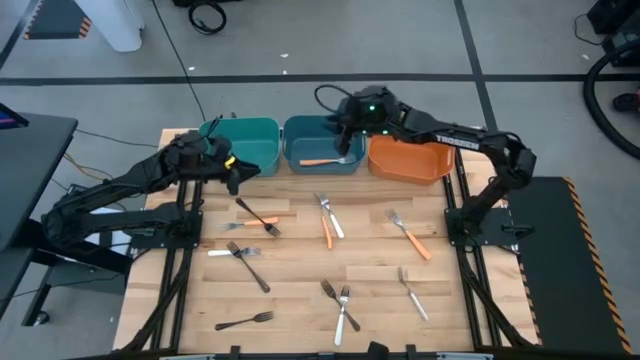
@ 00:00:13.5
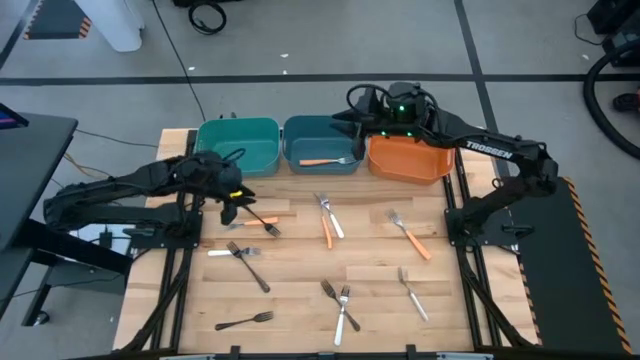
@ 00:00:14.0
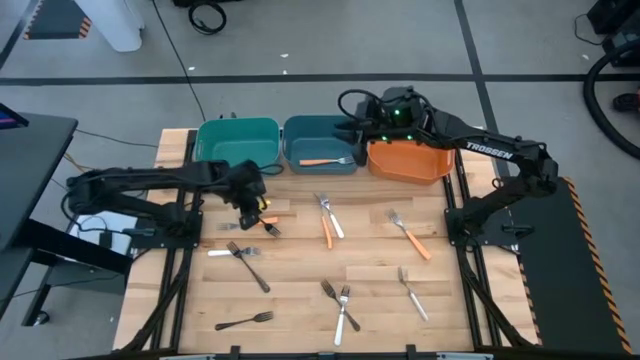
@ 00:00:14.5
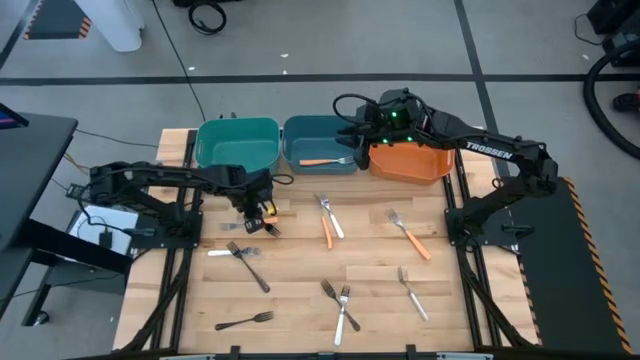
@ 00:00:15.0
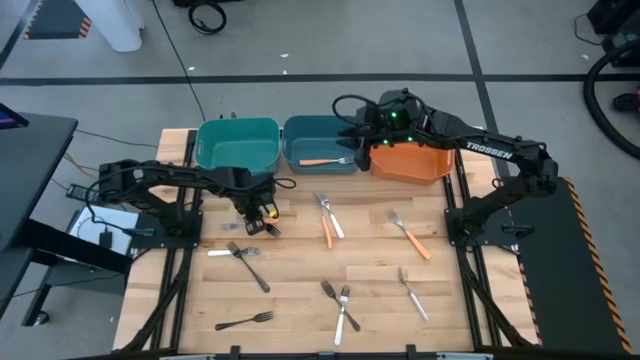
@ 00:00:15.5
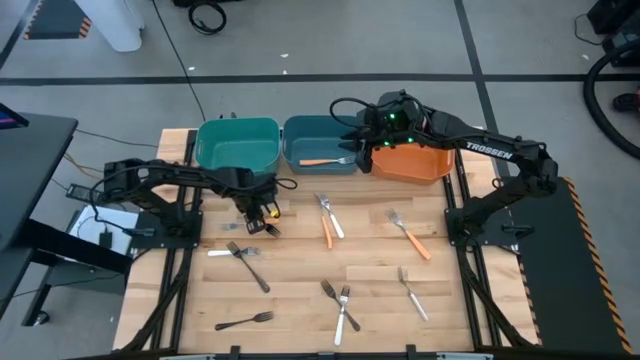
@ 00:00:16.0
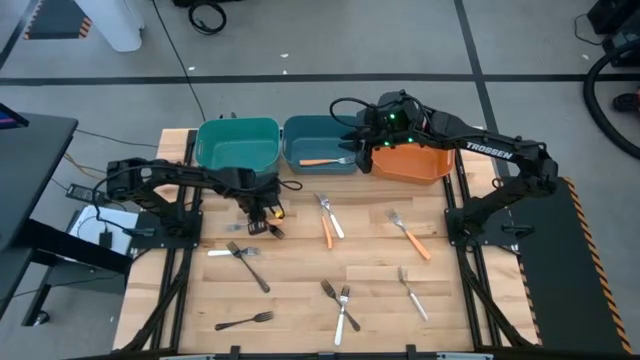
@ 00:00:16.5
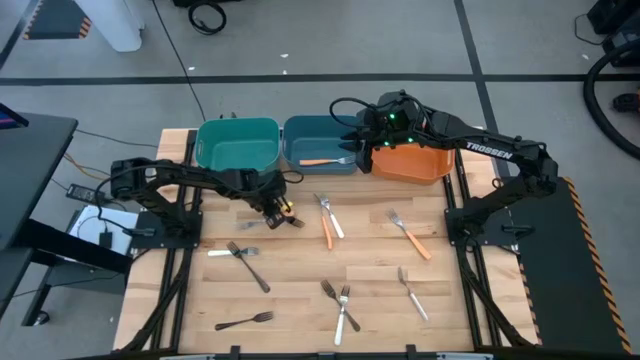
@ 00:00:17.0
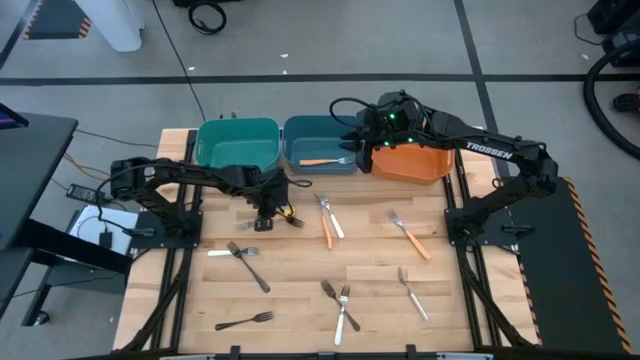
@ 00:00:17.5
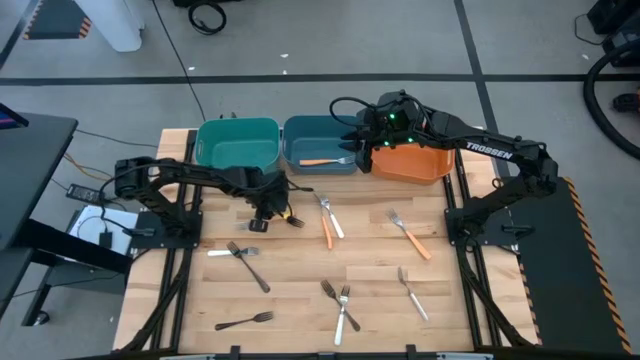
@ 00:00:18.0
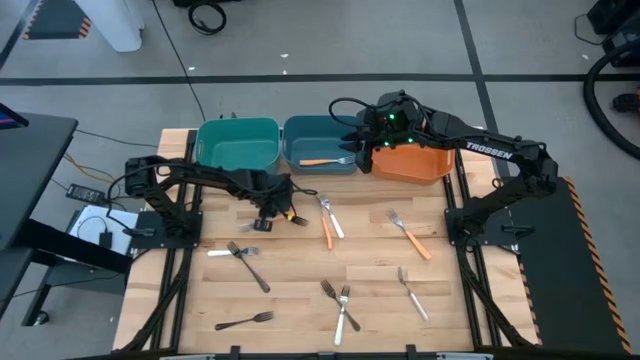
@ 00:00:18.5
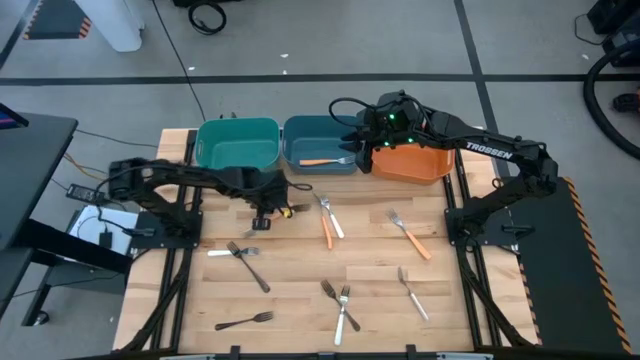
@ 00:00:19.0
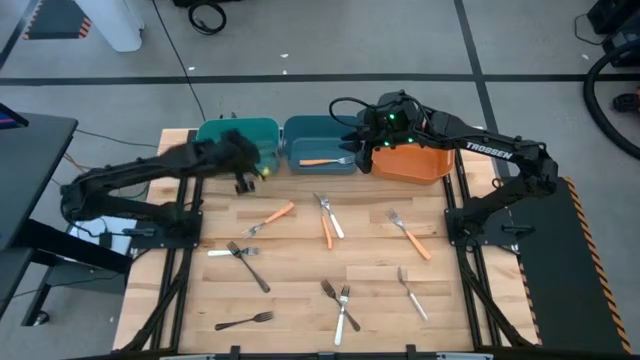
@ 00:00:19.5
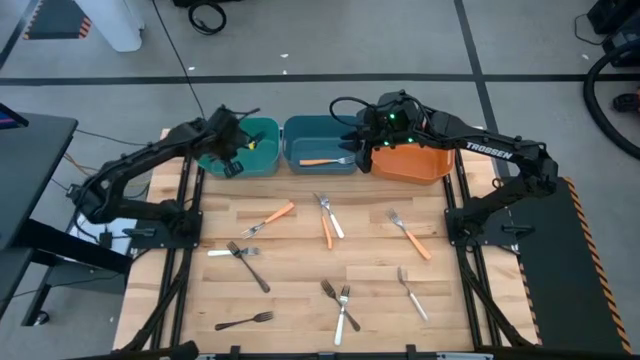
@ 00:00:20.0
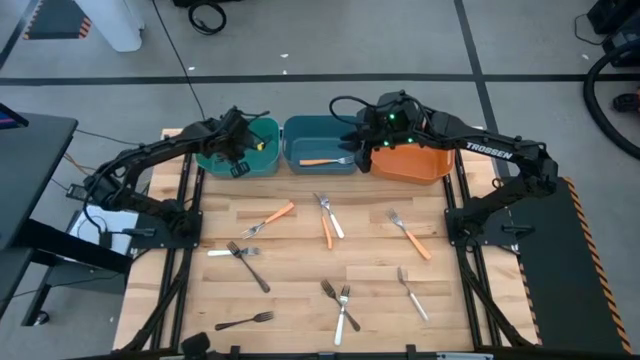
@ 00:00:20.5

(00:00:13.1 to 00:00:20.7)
Task: Sort silverware by color (type)
Put the top black fork in the green bin

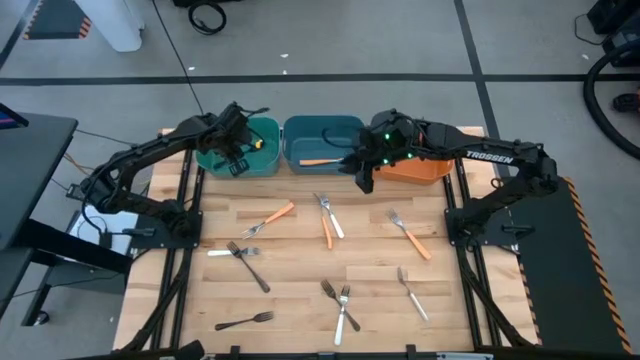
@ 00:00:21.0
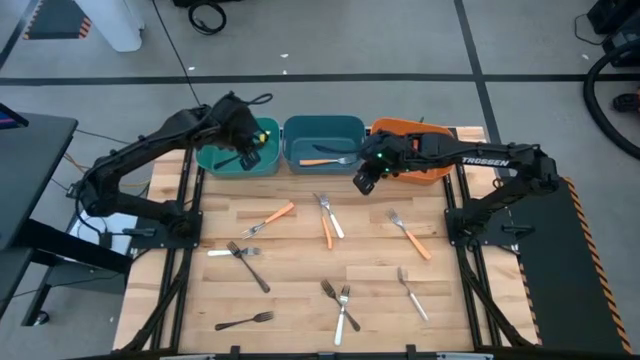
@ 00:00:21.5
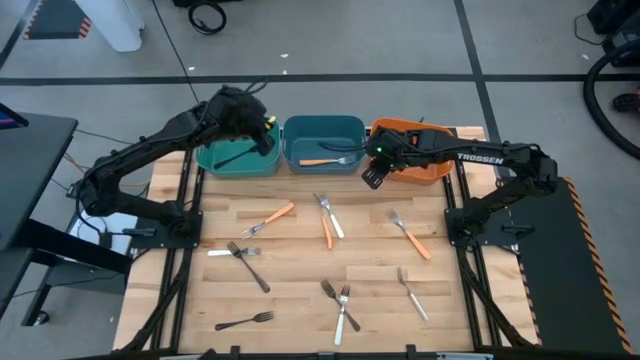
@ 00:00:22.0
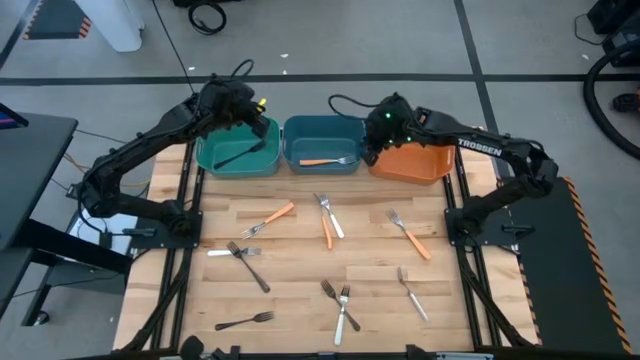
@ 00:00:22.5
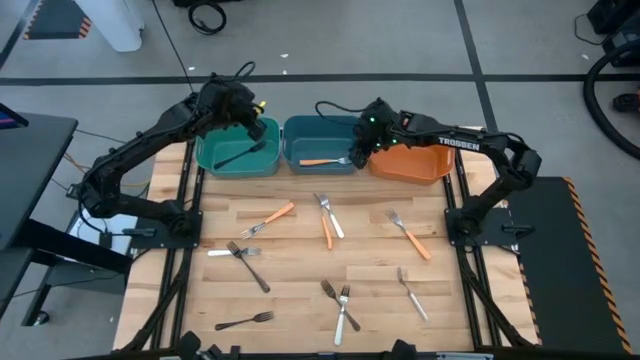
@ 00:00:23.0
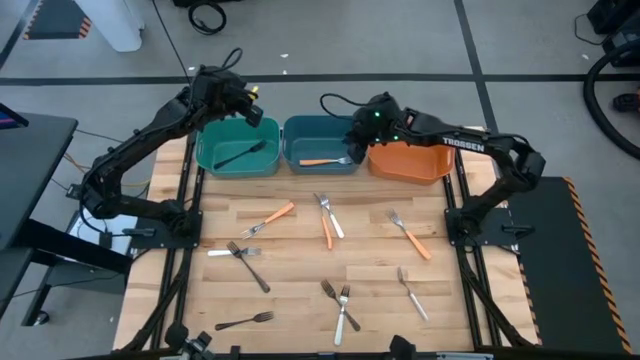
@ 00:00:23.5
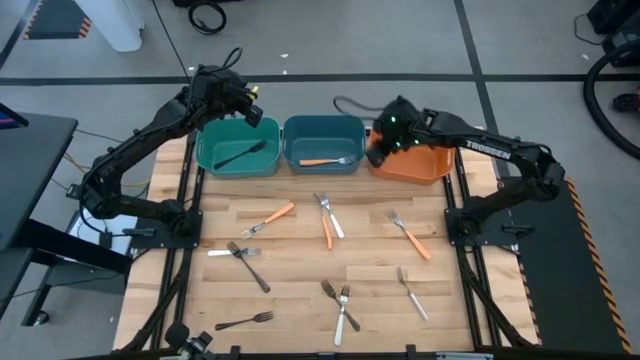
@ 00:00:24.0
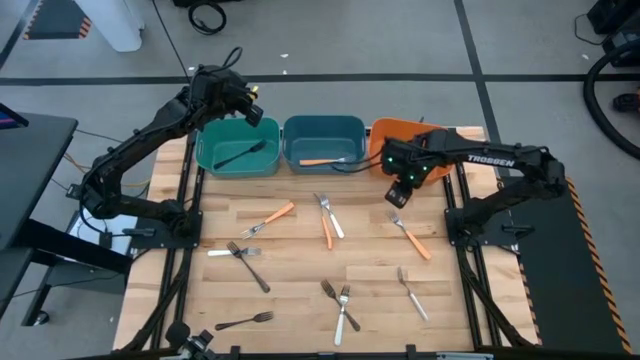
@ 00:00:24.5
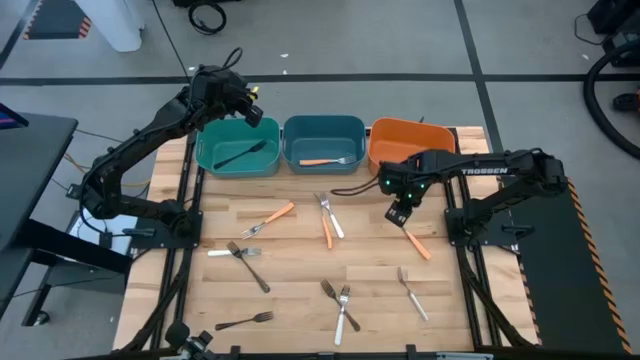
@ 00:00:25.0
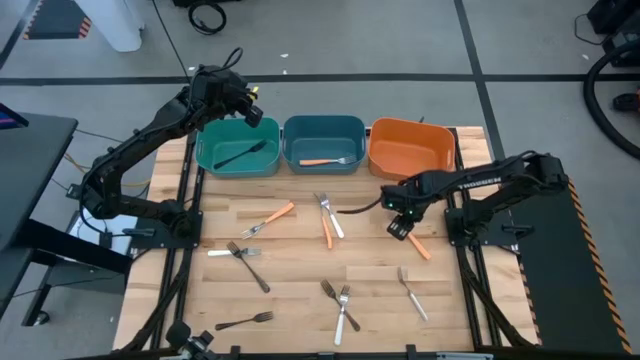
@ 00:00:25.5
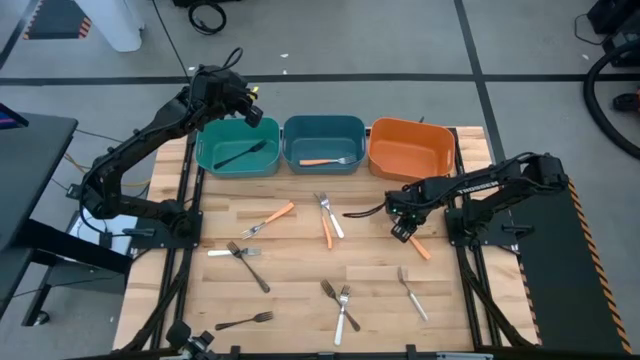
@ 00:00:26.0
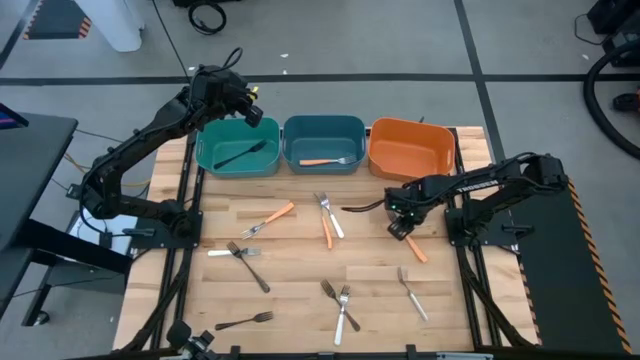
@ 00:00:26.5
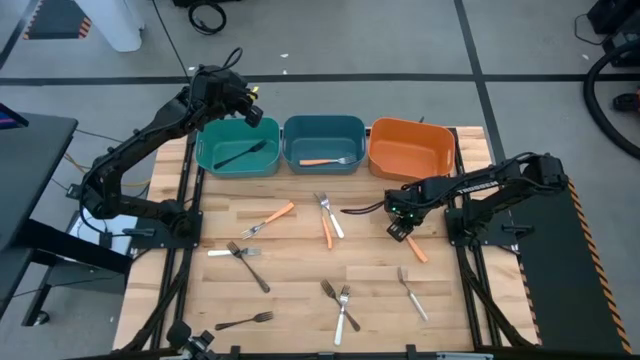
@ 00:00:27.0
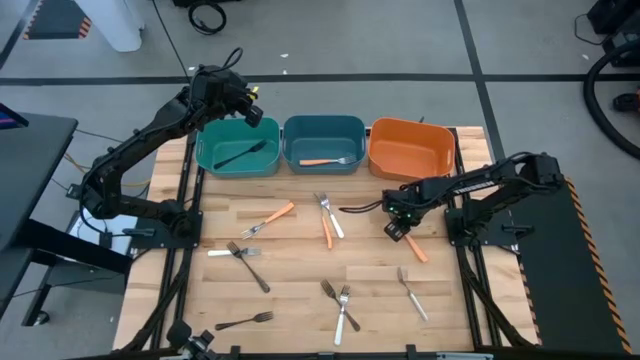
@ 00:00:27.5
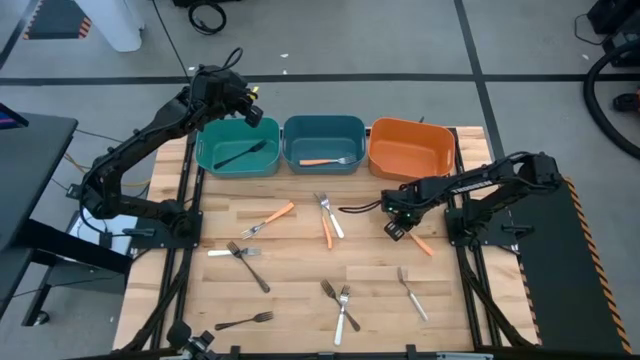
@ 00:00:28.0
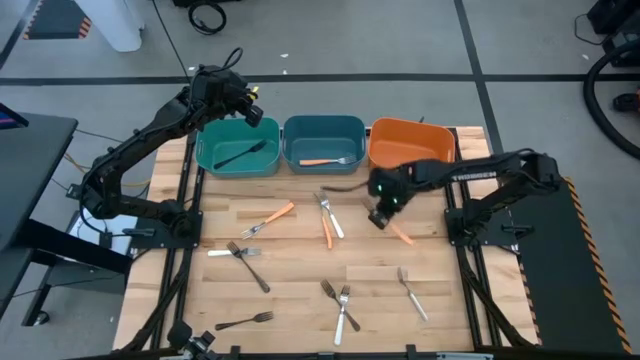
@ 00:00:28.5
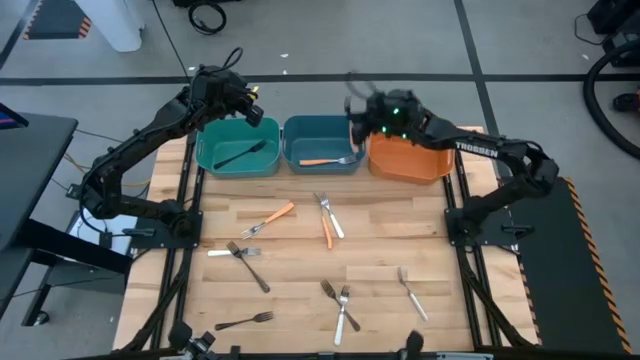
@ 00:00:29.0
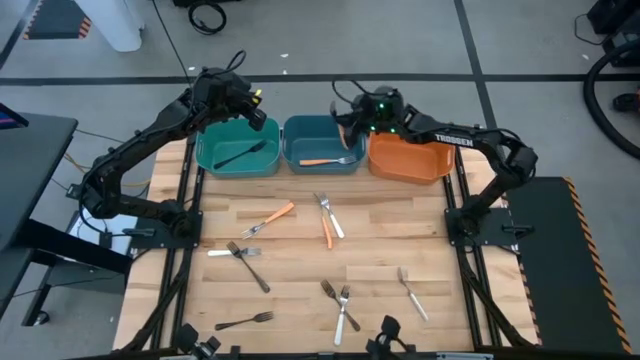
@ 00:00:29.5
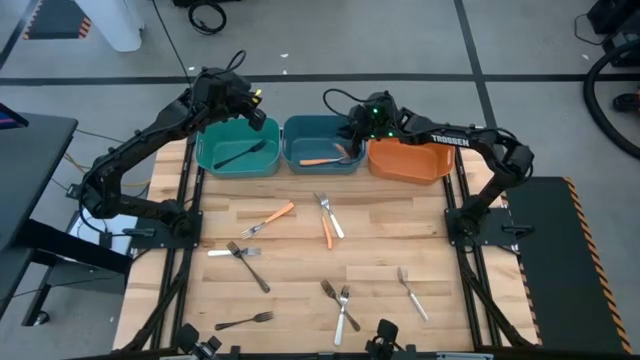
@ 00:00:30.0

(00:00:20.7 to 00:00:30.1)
Put the right orange fork in the blue bin

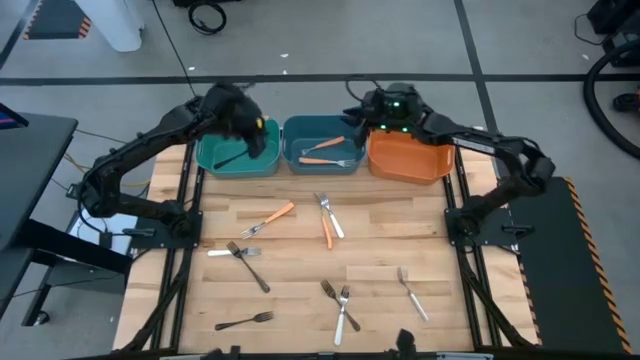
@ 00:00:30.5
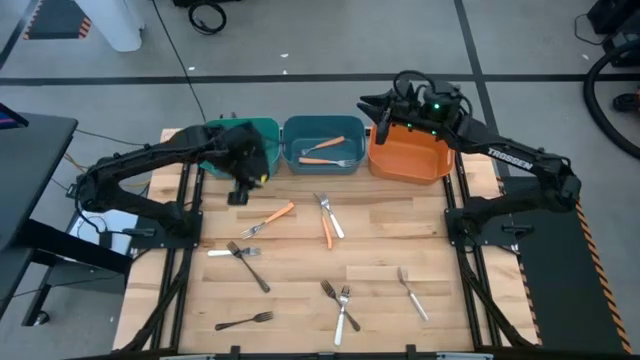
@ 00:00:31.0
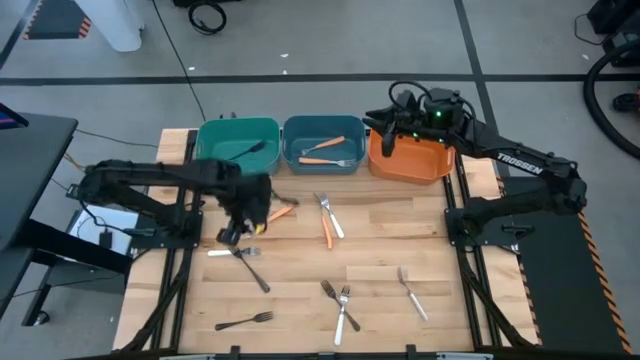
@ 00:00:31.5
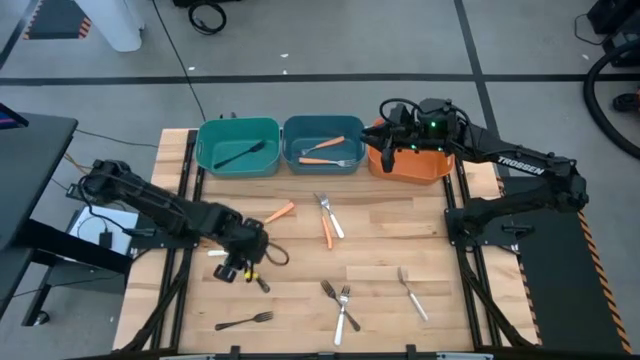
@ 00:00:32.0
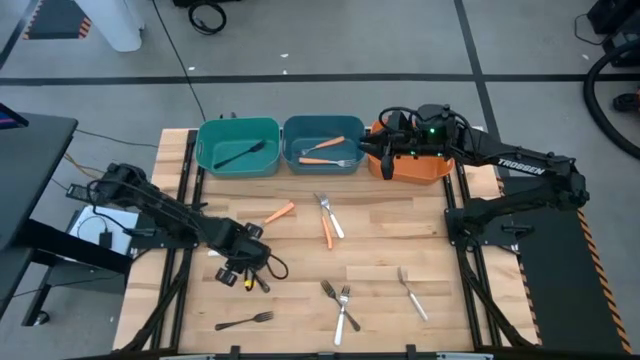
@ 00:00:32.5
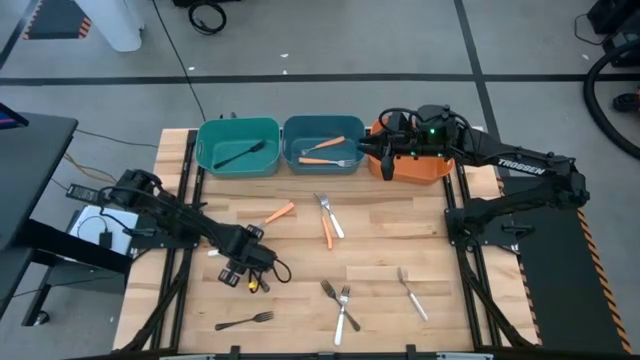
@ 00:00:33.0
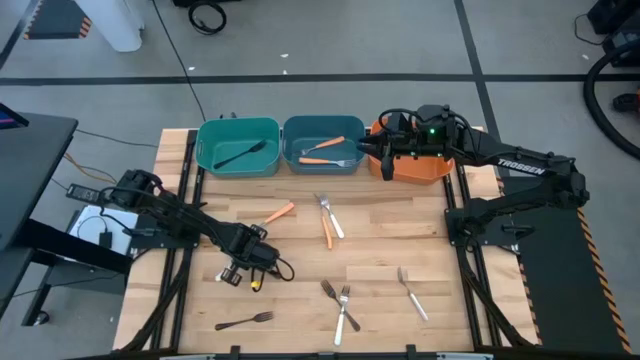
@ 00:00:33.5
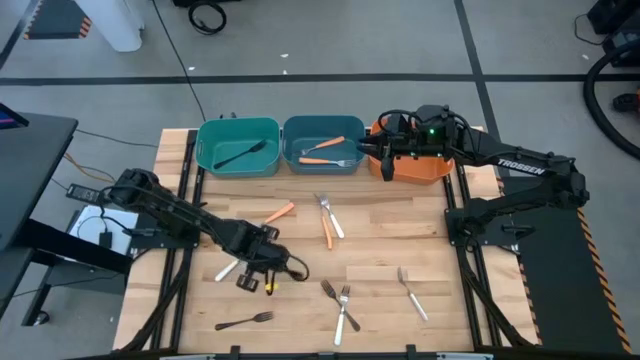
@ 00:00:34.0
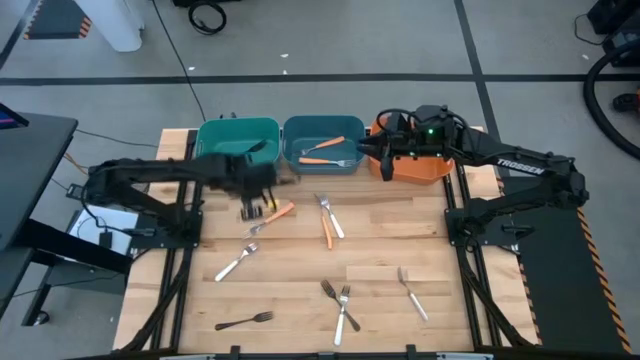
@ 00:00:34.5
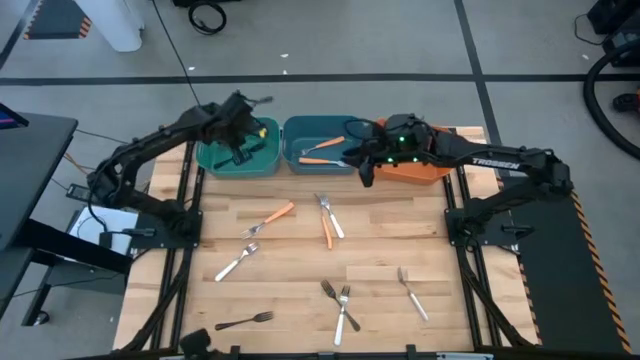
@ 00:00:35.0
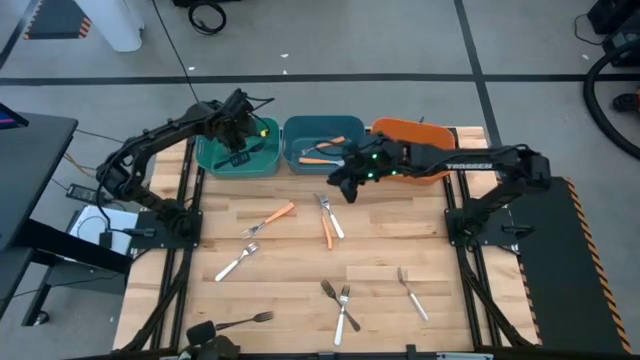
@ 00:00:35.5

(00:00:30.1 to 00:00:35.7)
Put the top left black fork in the green bin
